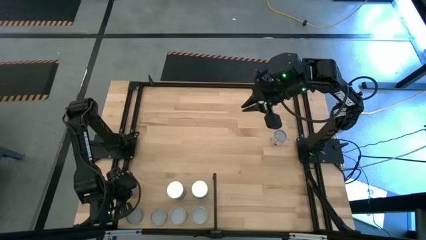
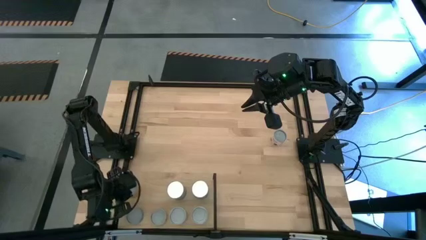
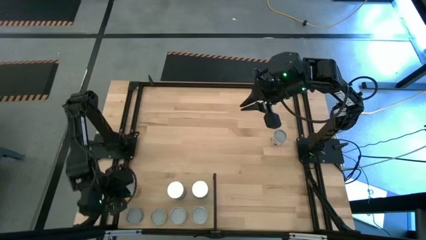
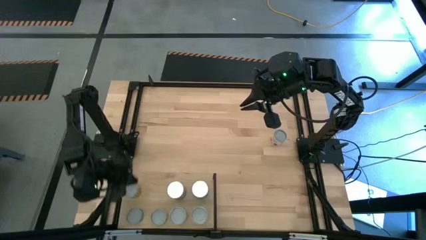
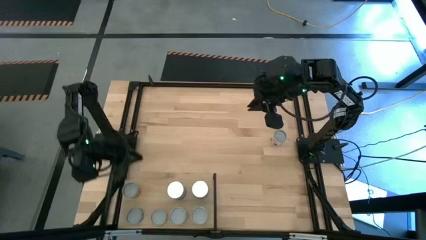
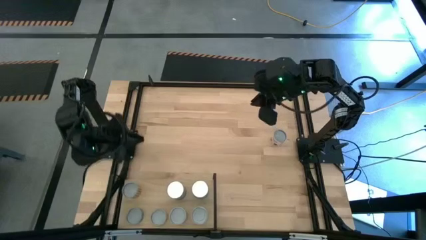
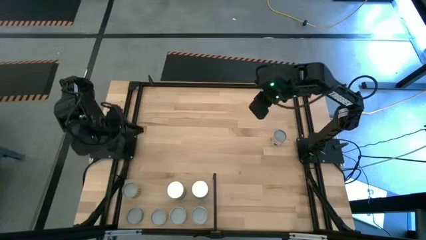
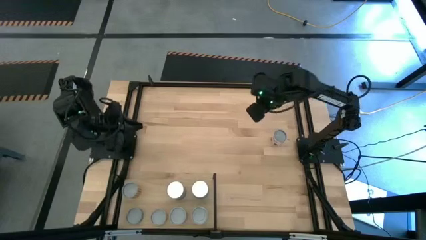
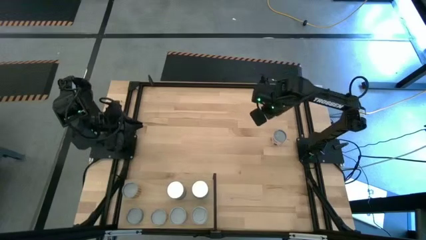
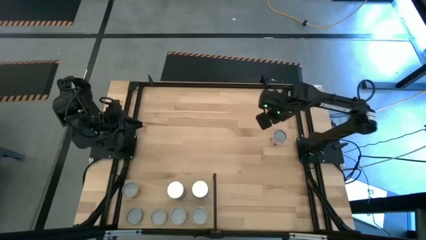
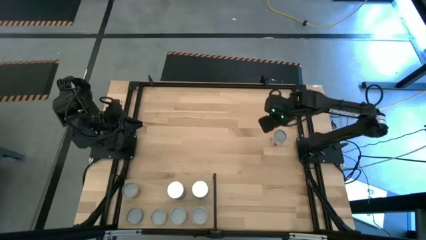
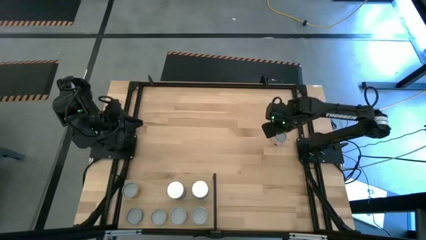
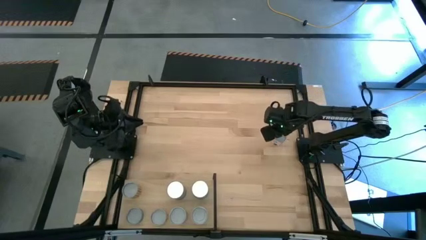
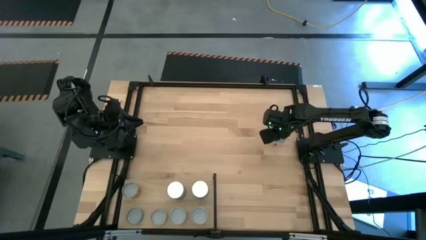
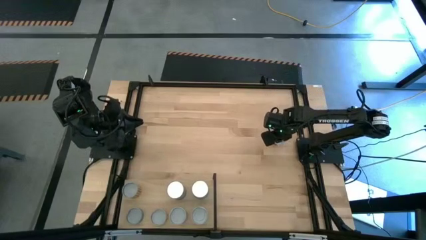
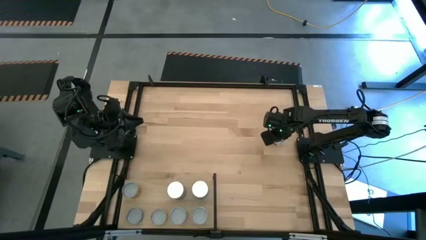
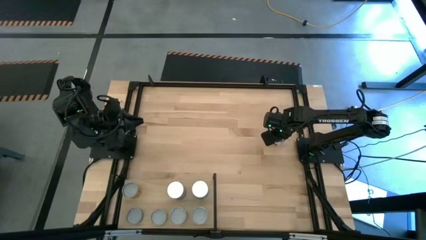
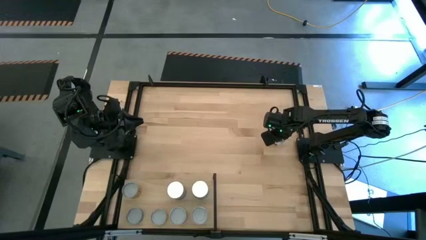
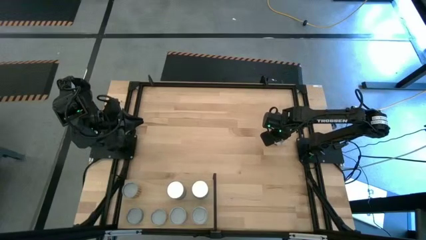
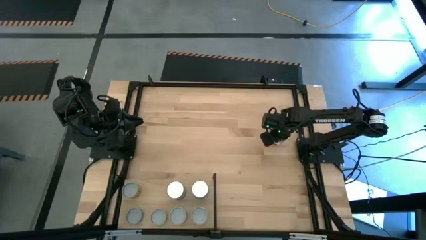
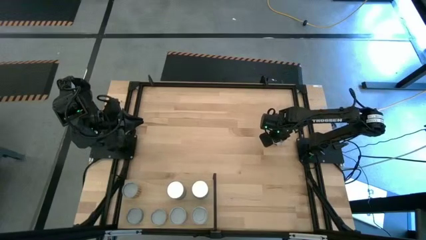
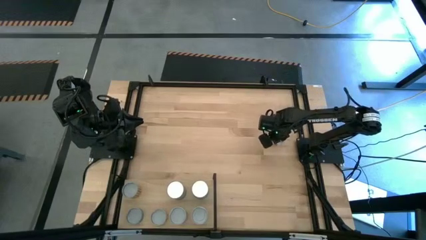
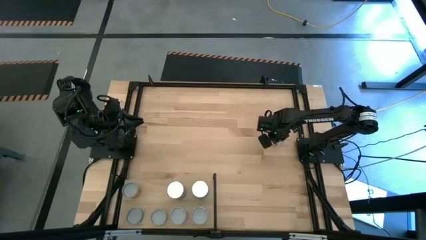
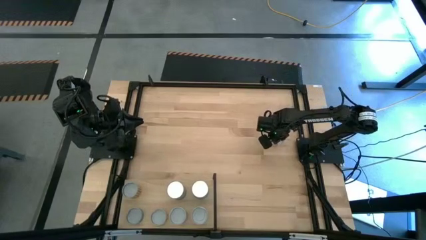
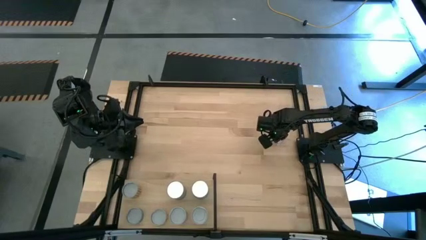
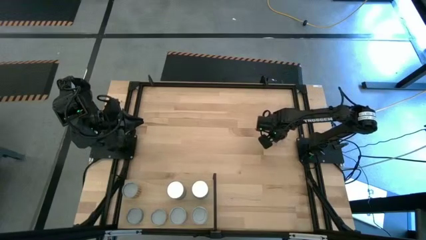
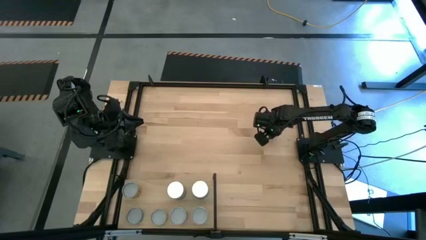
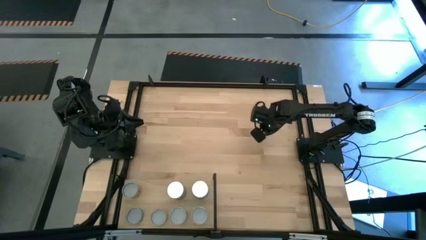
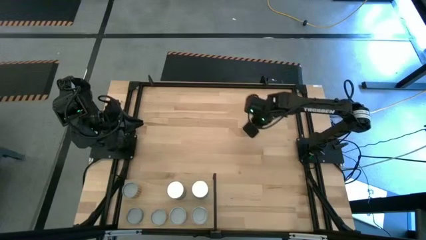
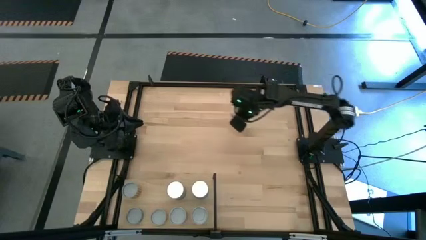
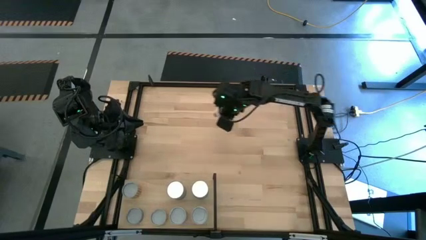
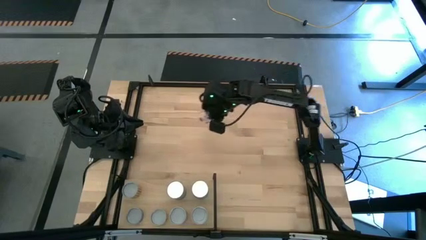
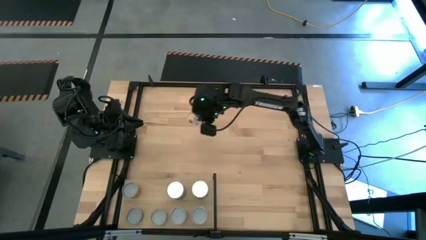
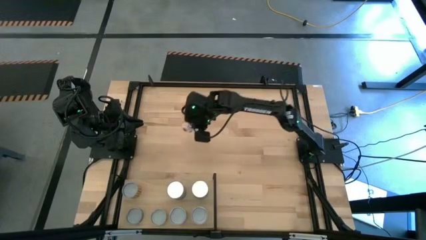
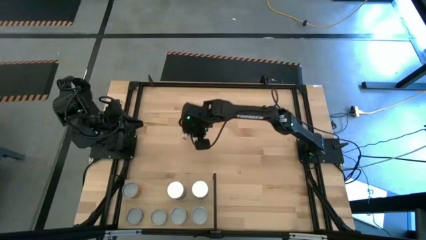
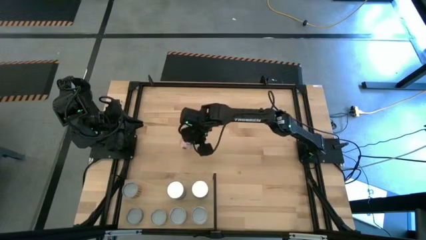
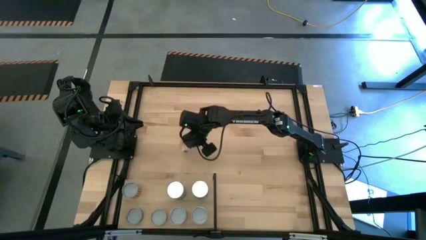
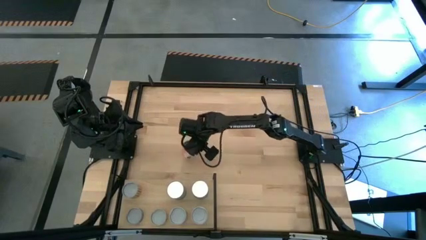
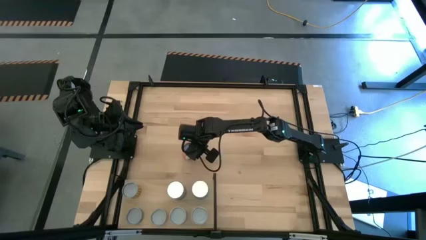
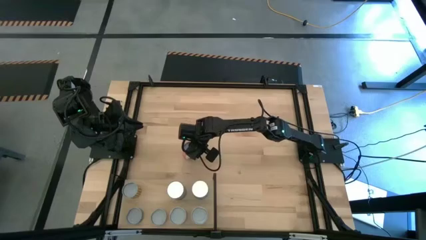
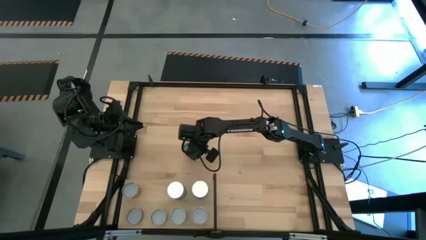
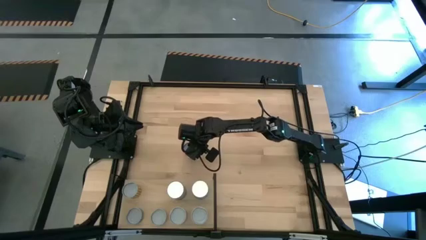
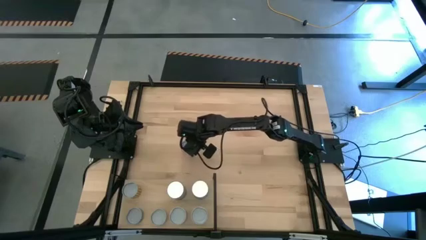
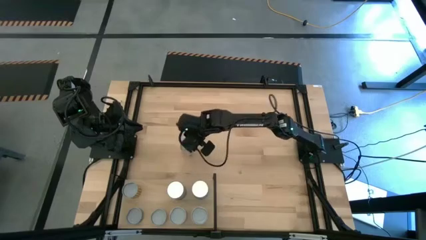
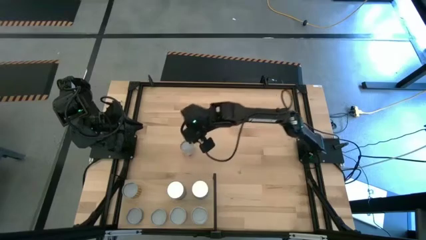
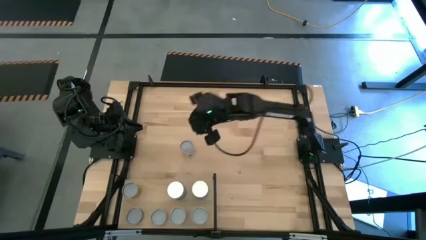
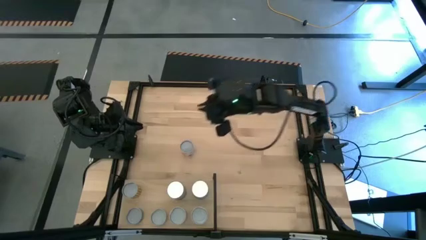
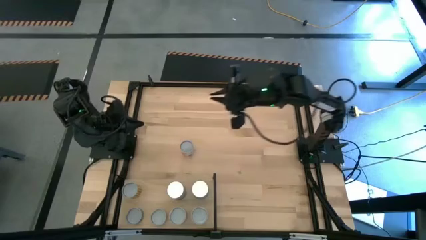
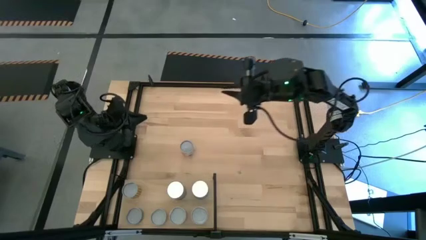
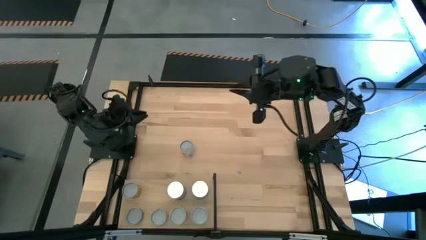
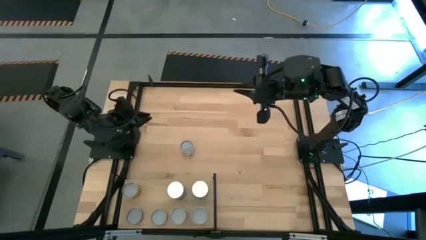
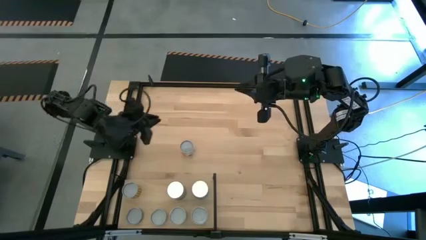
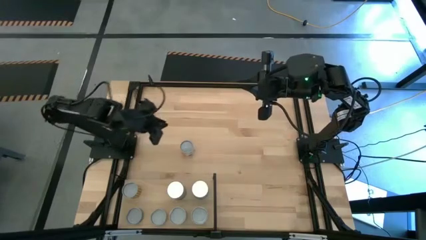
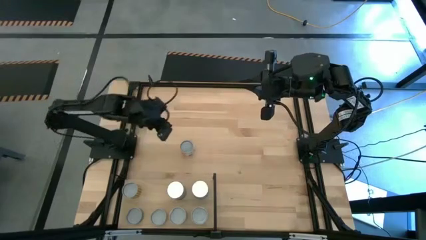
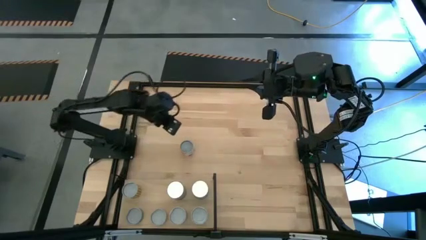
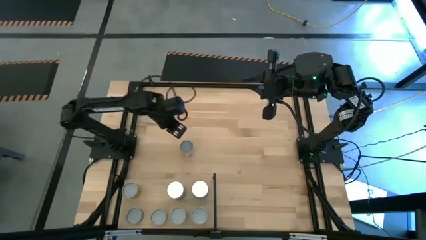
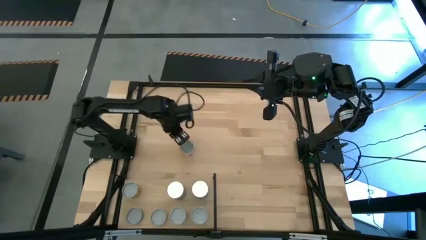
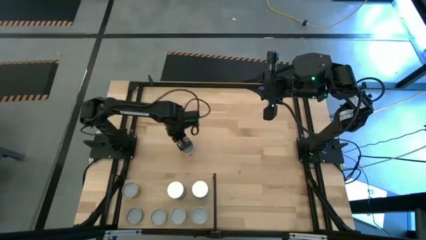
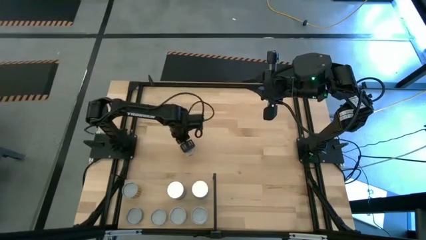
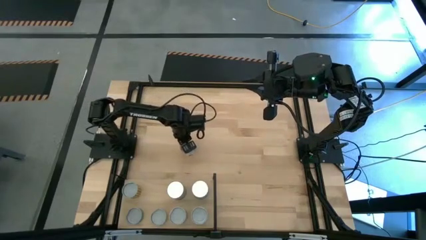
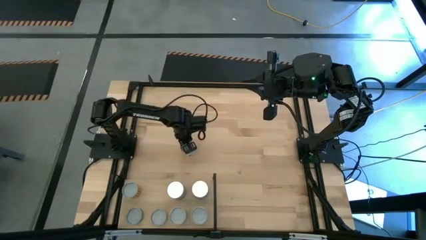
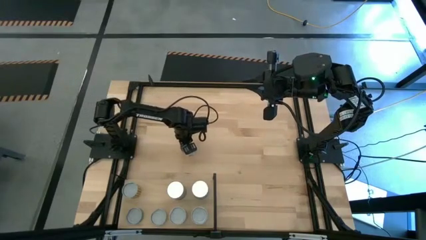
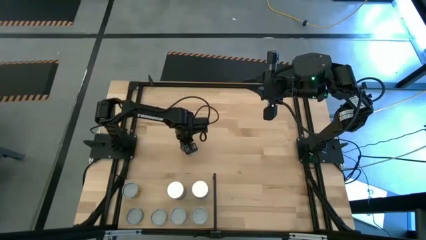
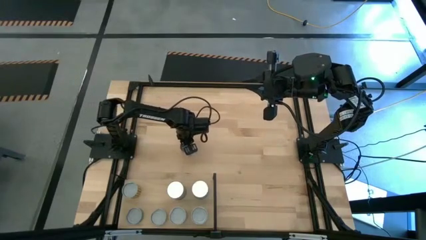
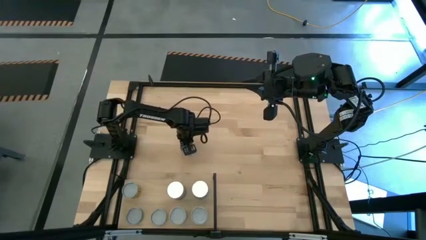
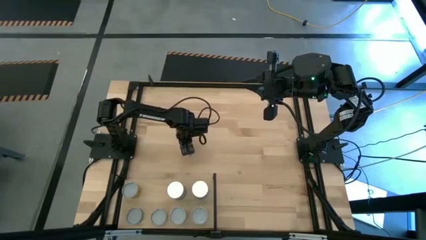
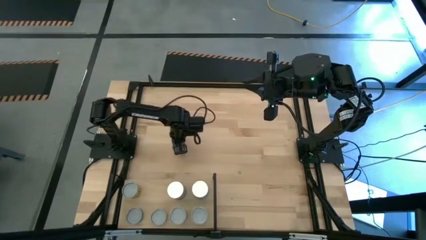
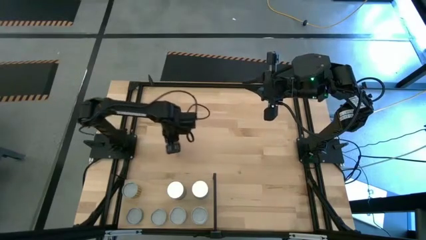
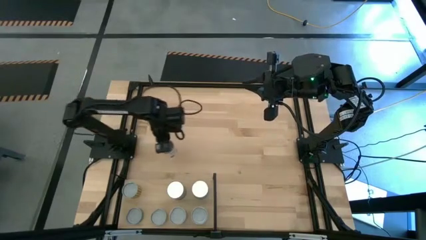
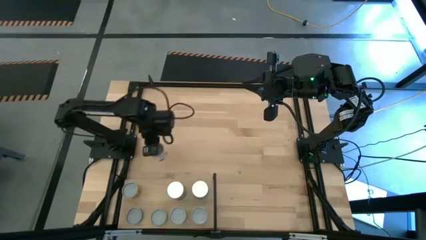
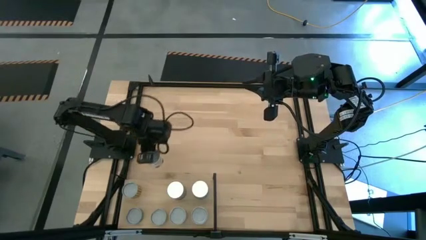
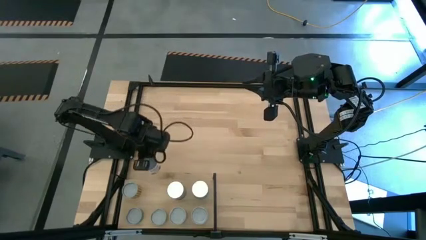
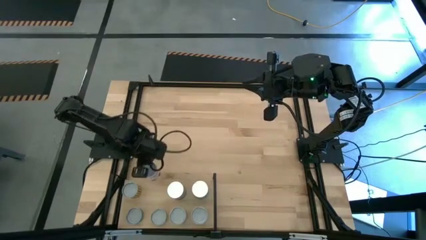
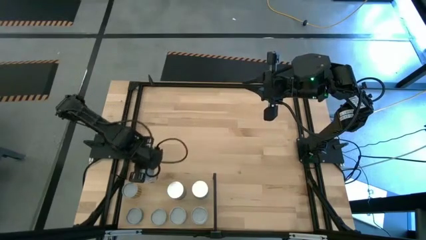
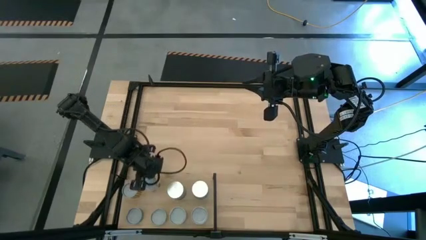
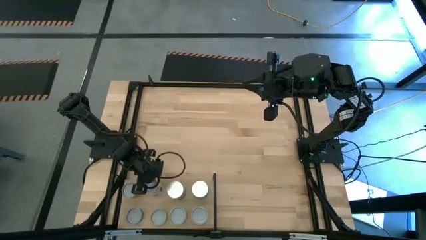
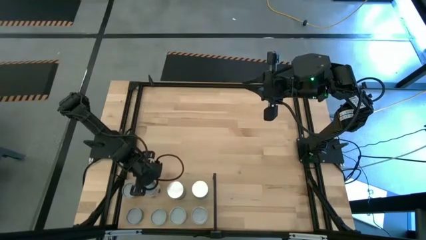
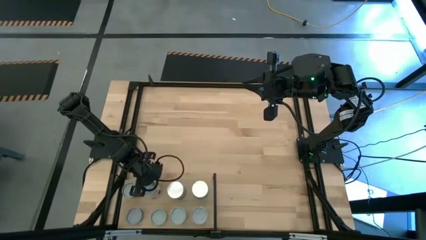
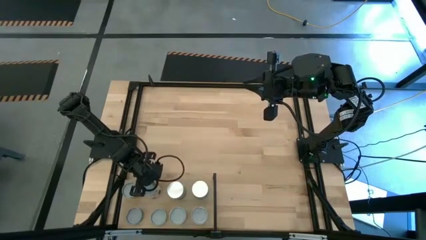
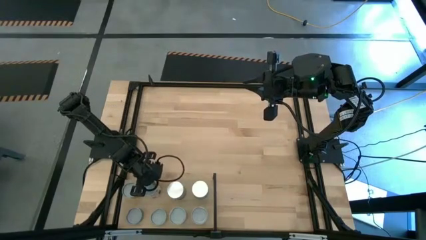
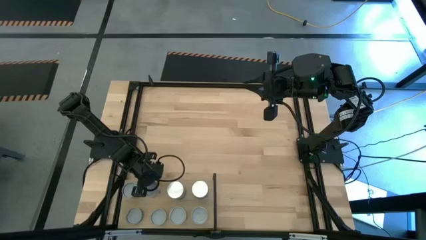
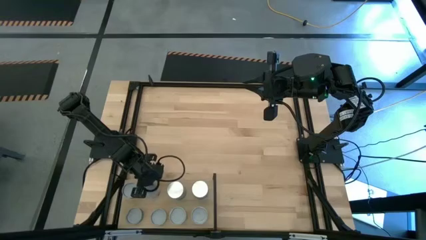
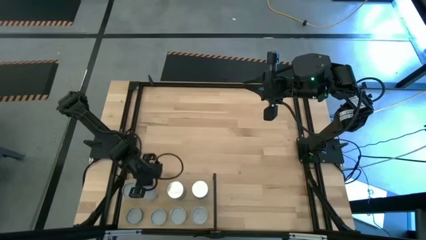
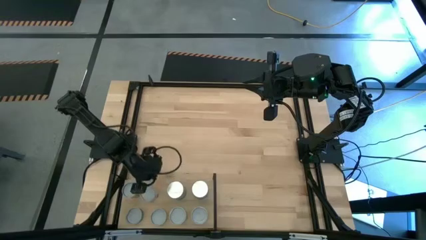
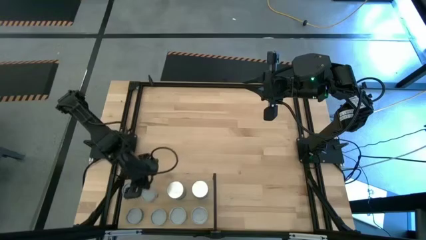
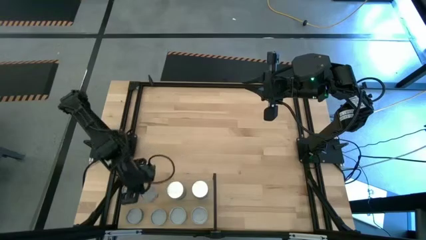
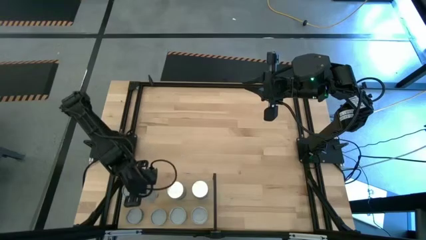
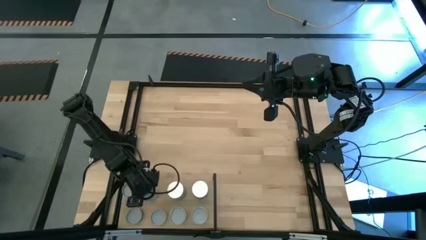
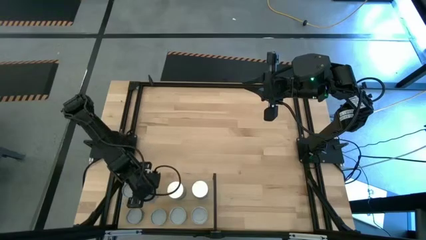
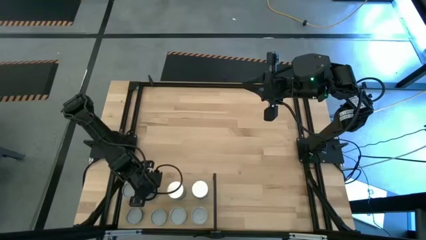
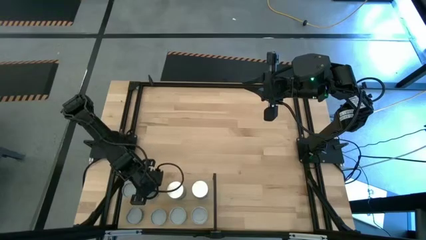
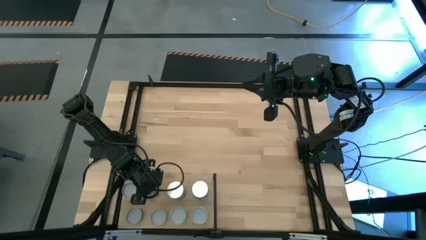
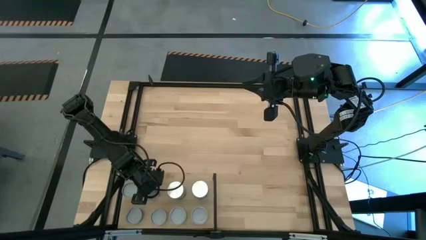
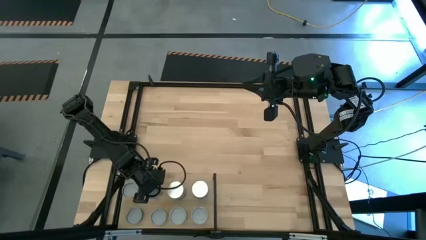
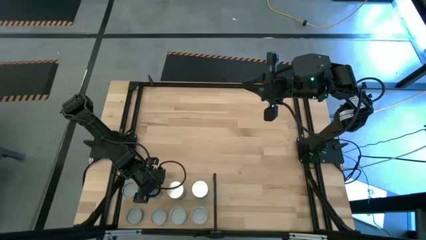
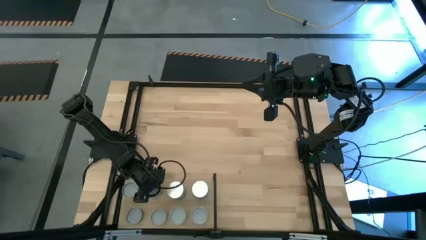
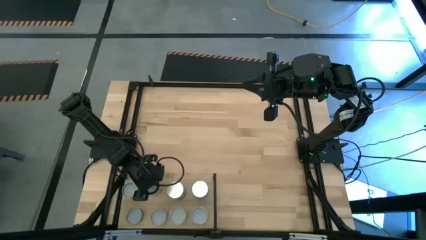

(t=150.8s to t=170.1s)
Task: Pick and place cans onto a shelf
Put the canned meatballs on the shelf
